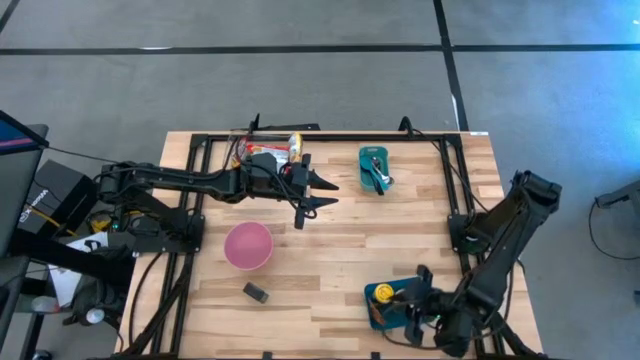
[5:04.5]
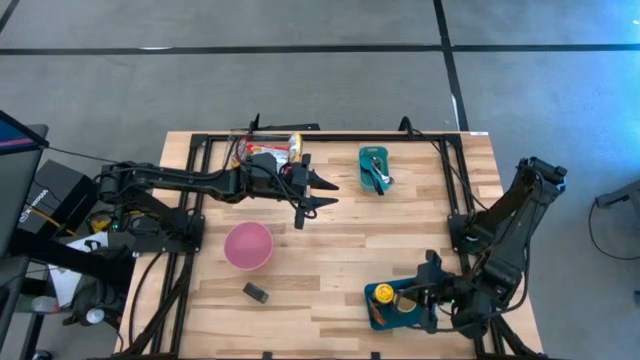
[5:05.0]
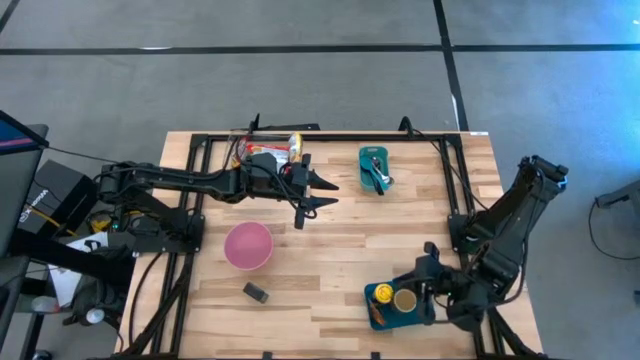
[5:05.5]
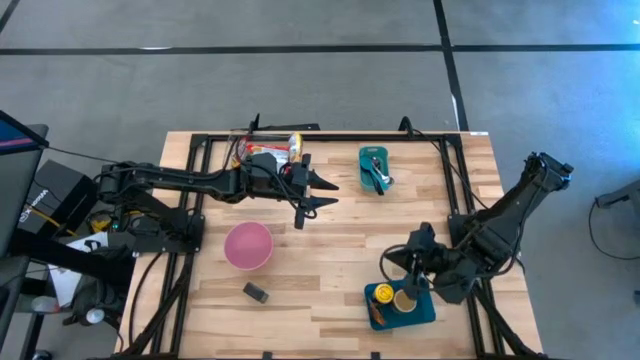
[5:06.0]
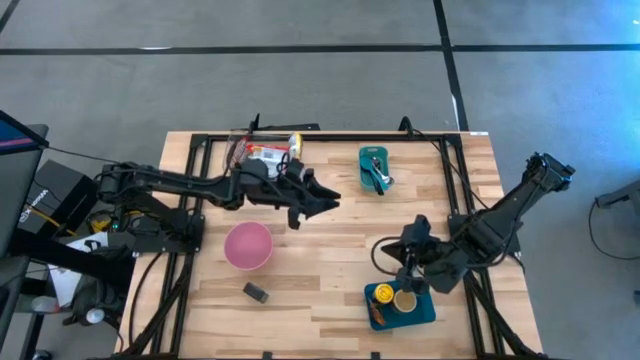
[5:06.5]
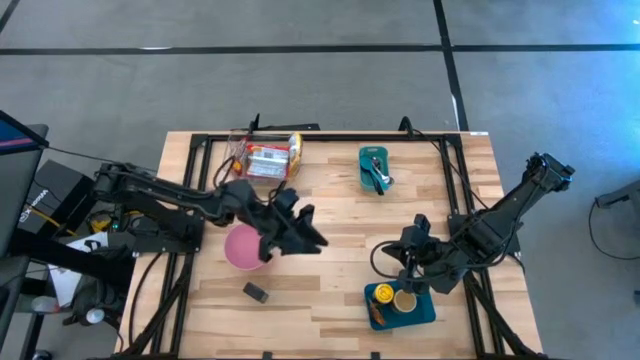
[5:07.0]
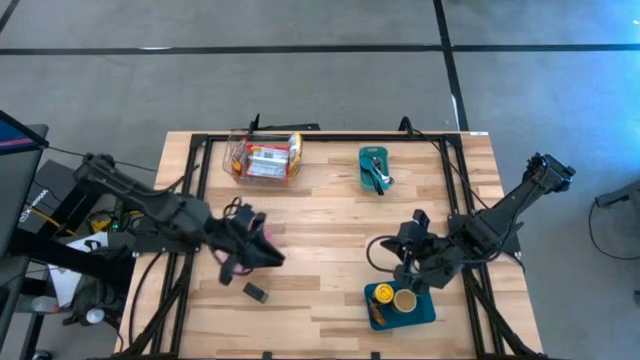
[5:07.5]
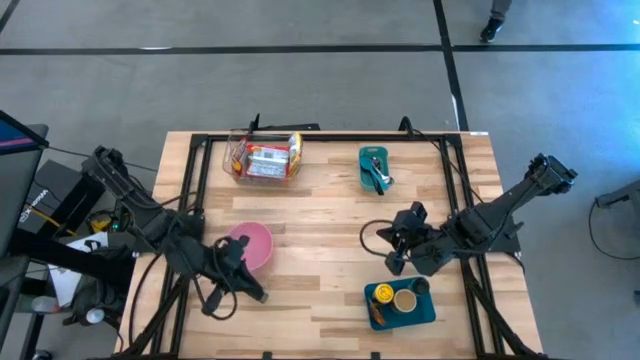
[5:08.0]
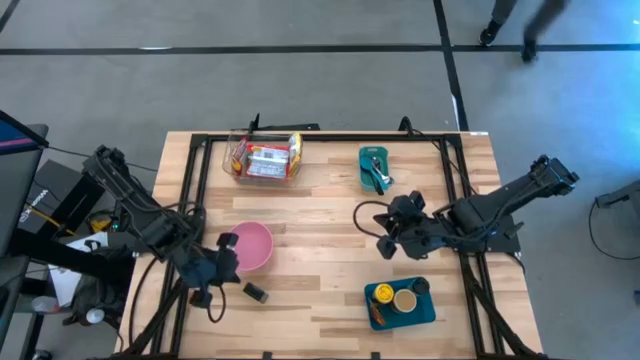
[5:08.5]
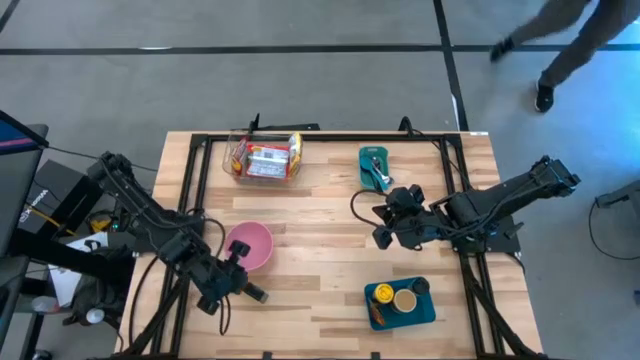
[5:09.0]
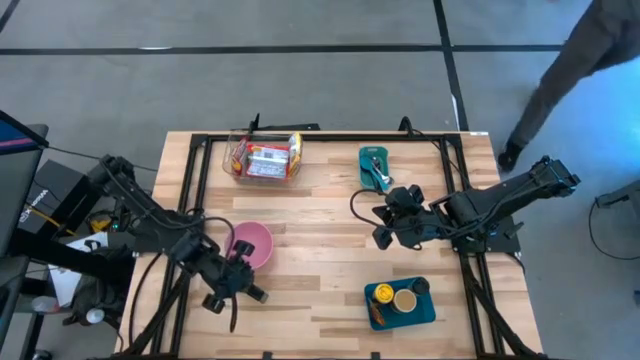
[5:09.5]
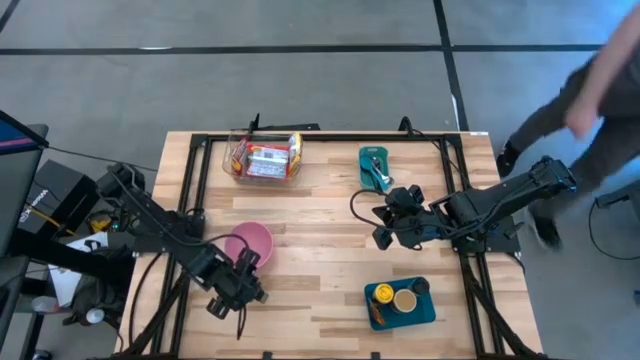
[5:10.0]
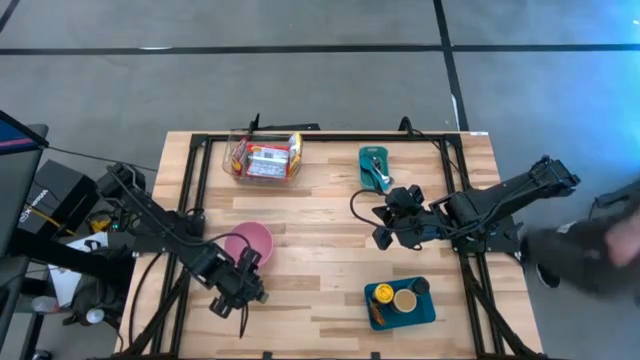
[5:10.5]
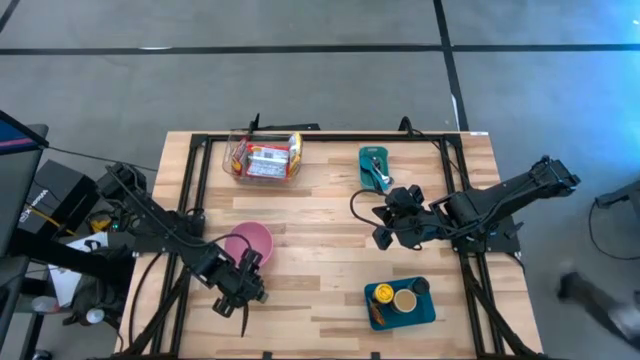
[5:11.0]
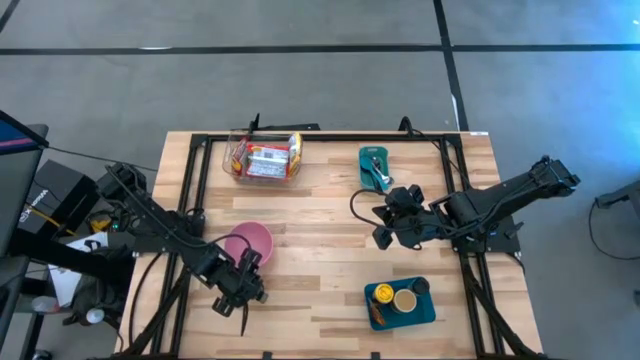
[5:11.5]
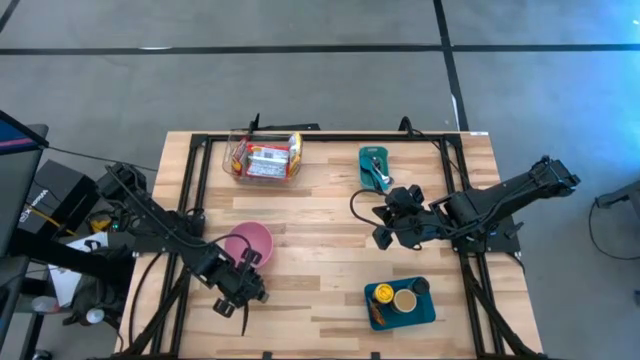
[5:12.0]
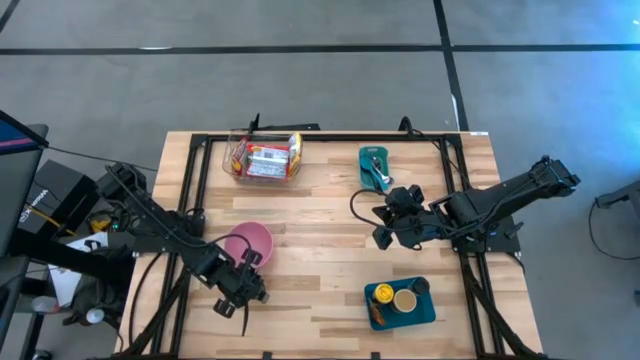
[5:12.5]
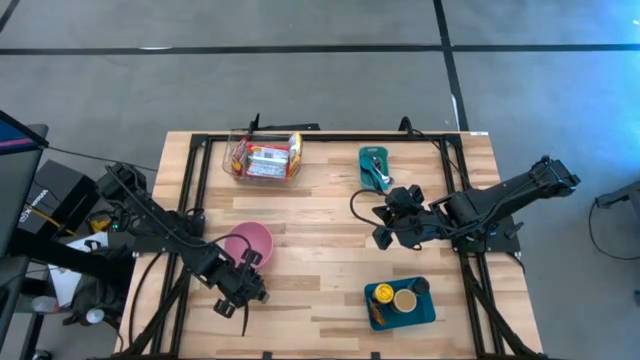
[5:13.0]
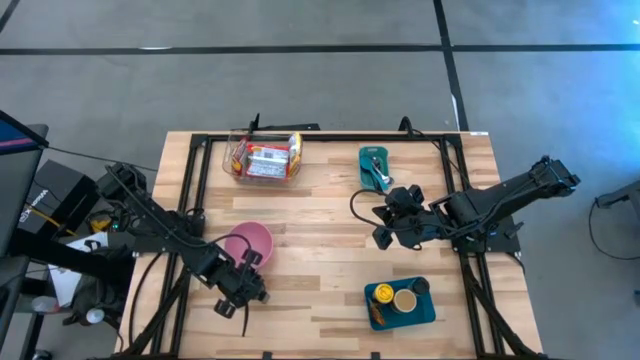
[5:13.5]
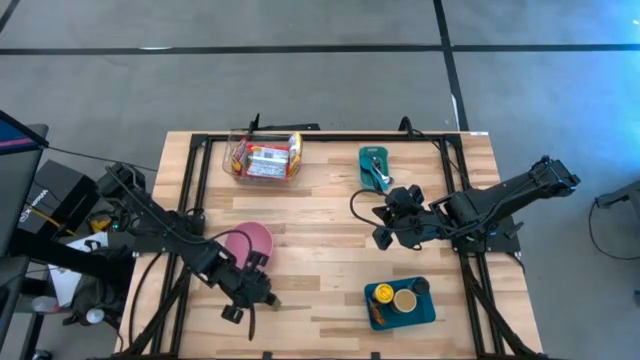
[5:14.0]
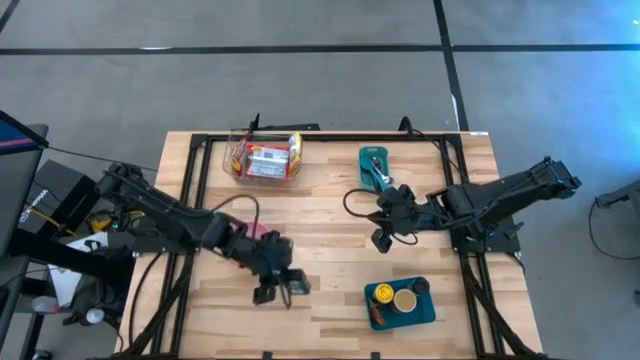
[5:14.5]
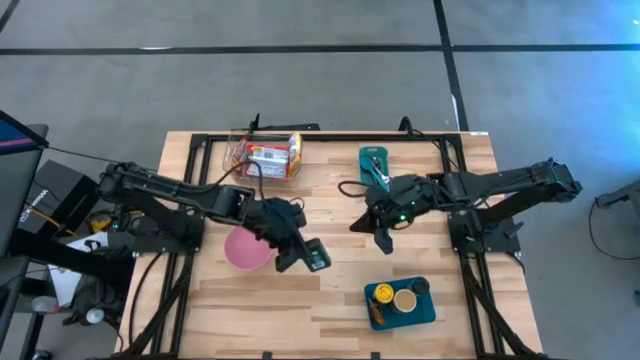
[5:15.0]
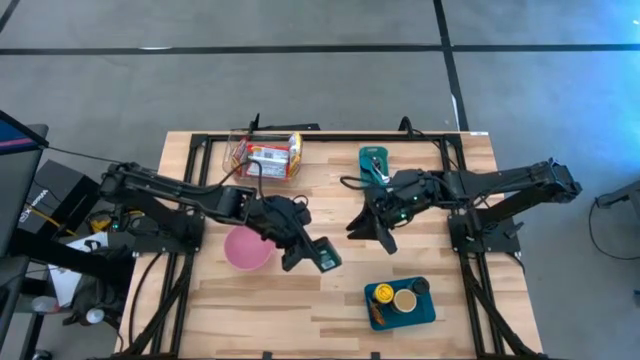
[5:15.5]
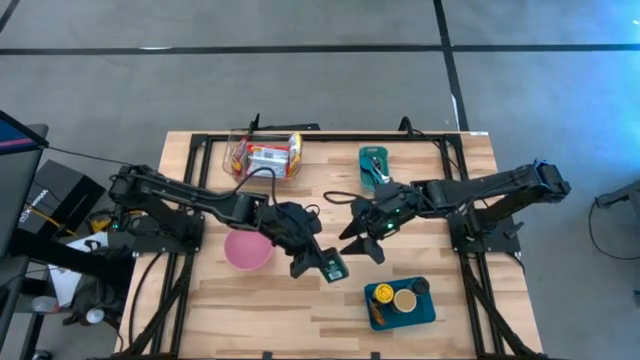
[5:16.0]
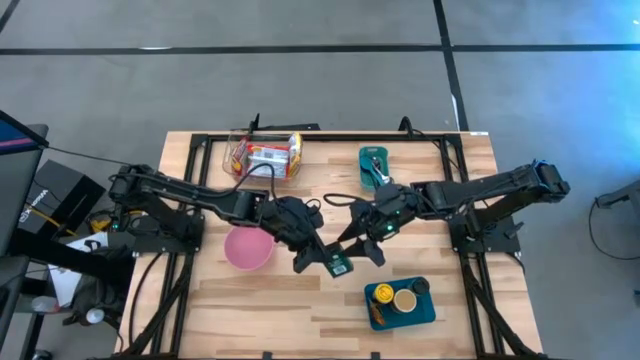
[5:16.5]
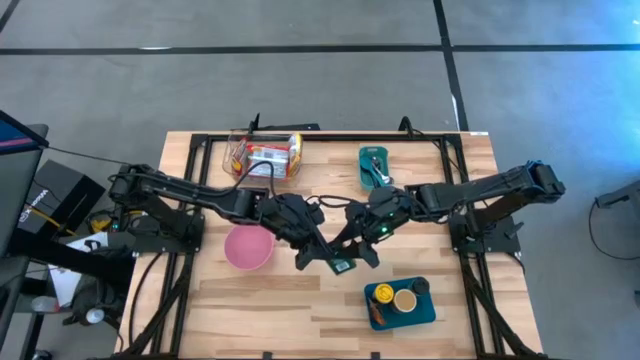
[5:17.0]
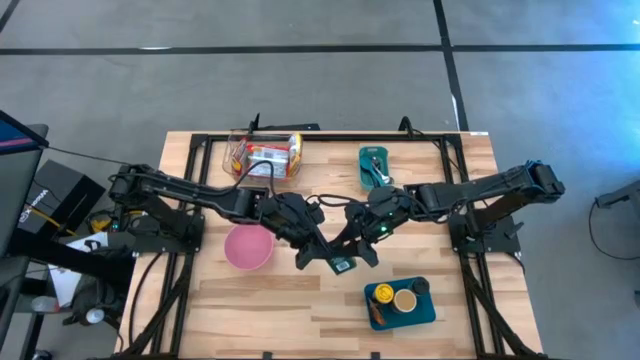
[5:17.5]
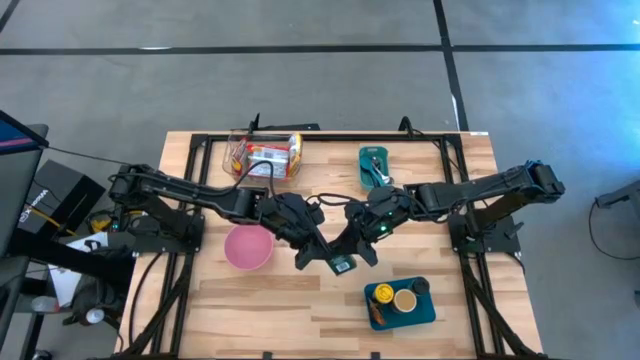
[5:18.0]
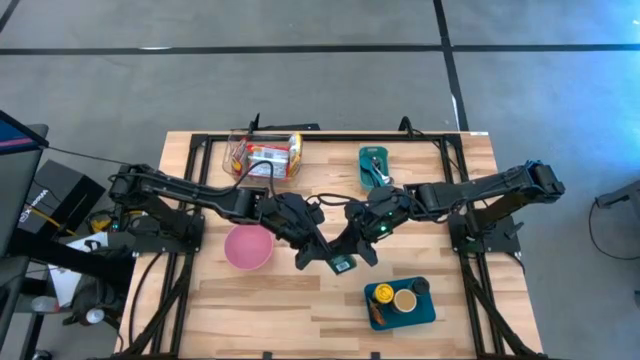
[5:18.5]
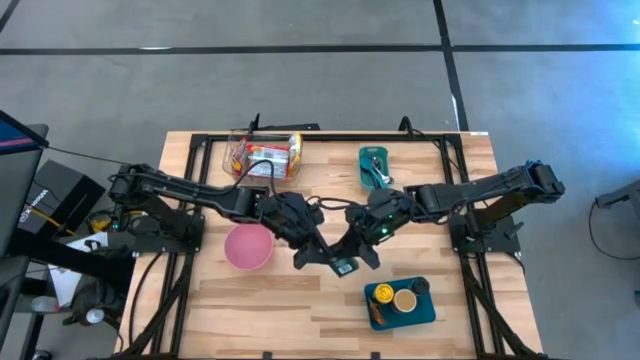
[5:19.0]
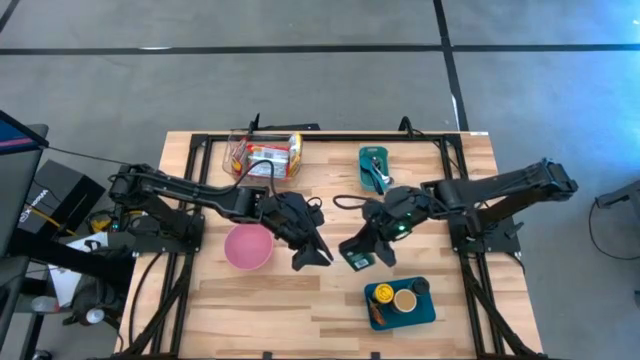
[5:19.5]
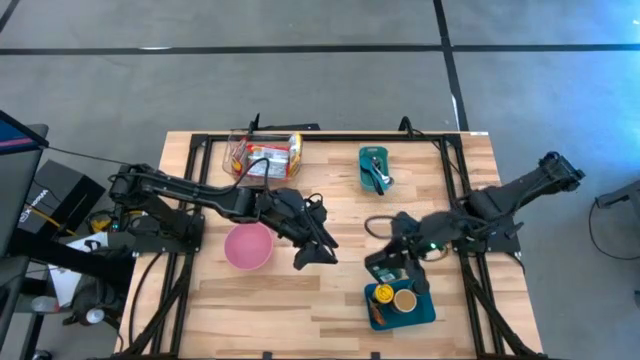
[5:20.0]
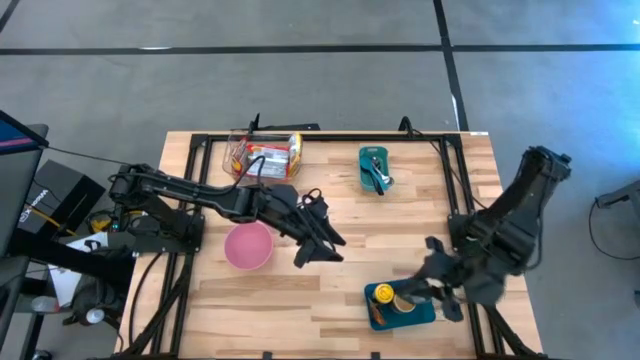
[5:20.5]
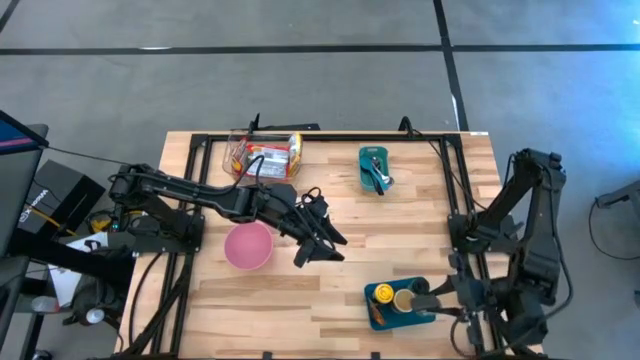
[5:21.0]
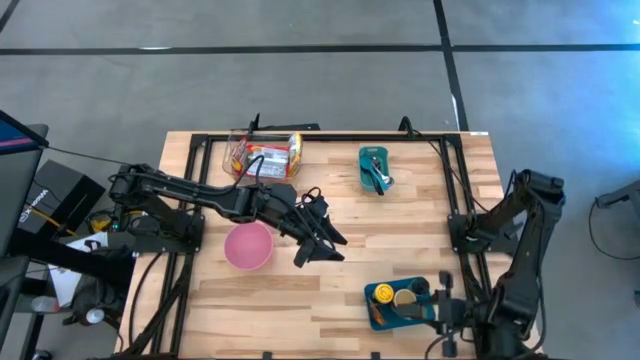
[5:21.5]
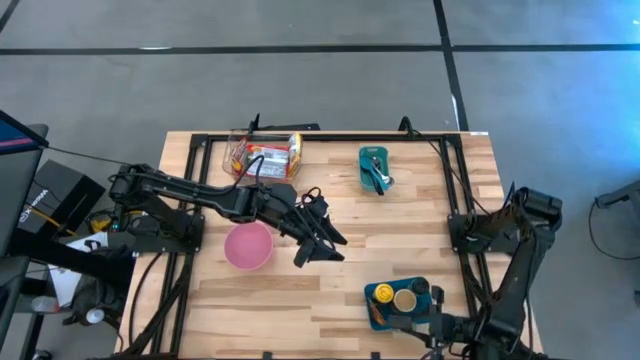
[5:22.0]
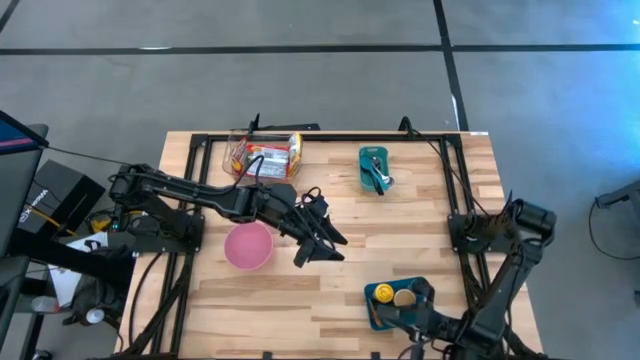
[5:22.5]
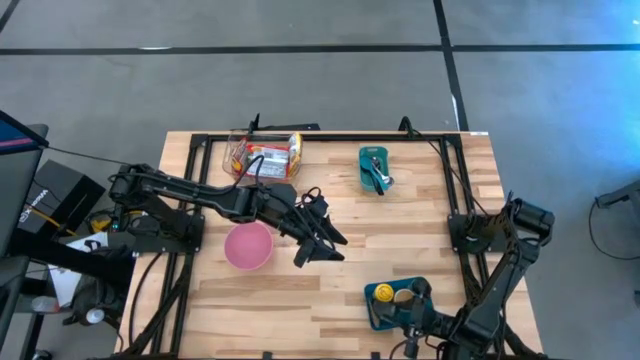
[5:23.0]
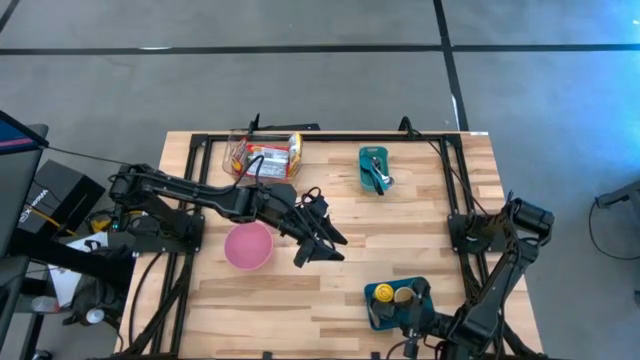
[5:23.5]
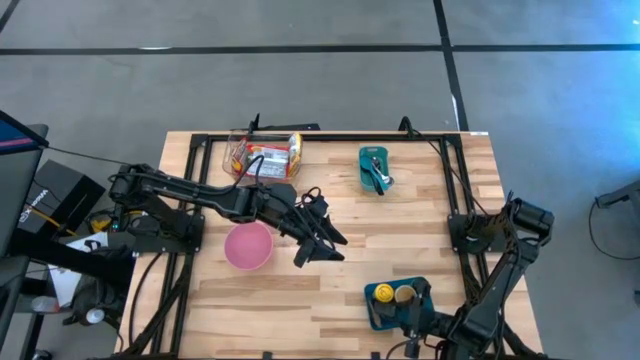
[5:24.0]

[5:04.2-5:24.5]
Task: Pick & Place Food Item
Put the black seasoning can into the blue bin
